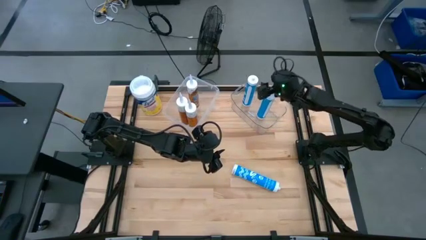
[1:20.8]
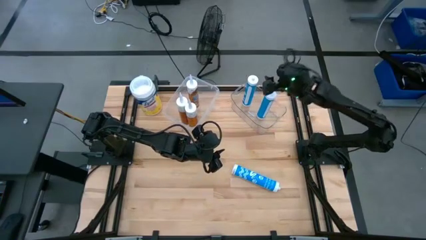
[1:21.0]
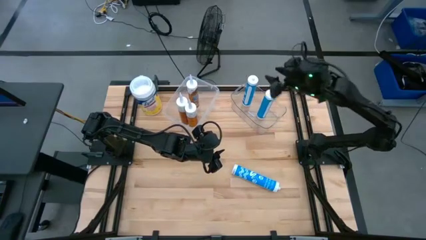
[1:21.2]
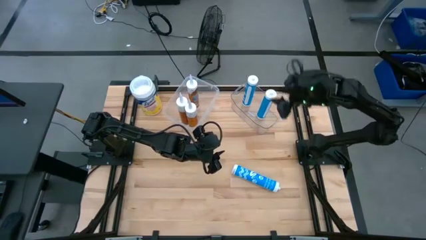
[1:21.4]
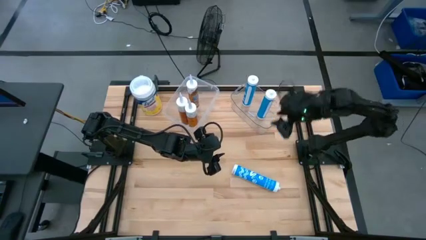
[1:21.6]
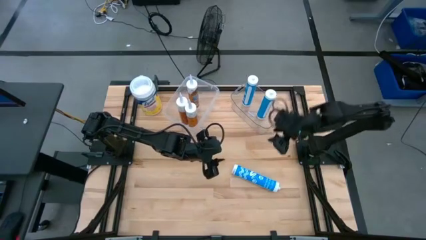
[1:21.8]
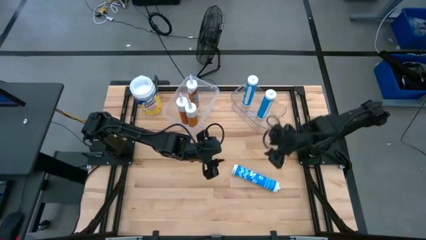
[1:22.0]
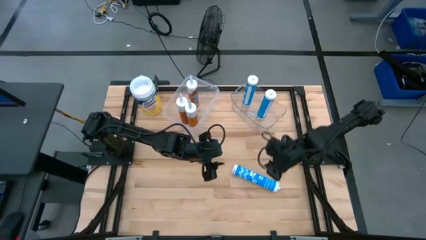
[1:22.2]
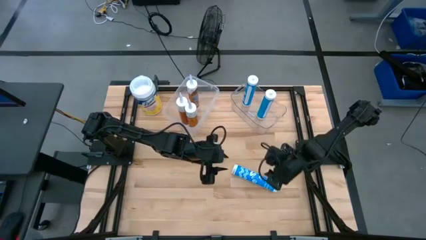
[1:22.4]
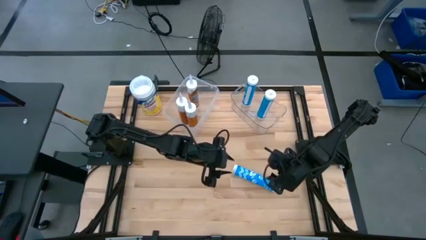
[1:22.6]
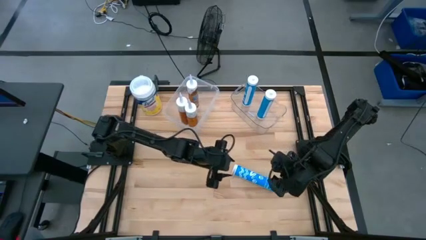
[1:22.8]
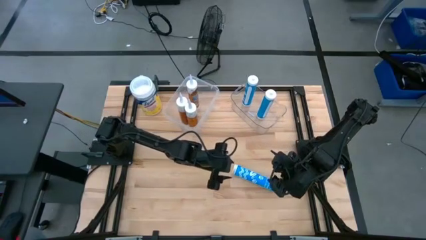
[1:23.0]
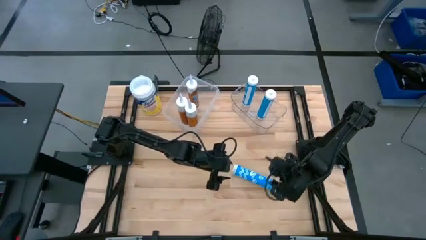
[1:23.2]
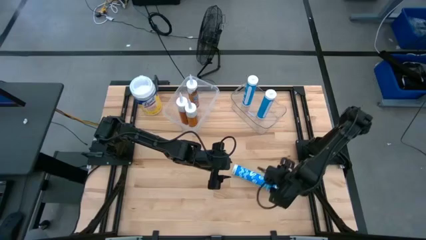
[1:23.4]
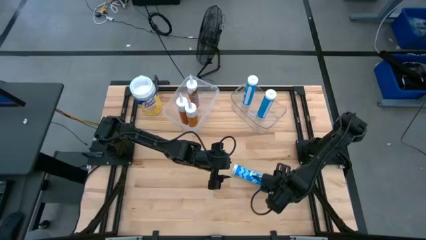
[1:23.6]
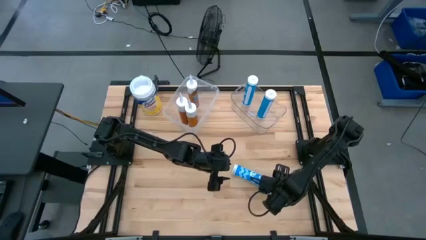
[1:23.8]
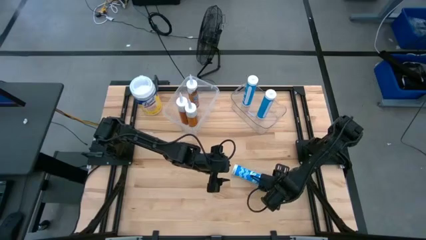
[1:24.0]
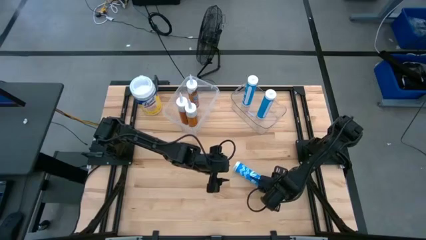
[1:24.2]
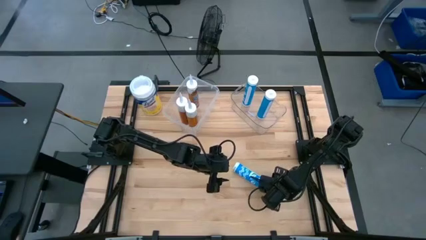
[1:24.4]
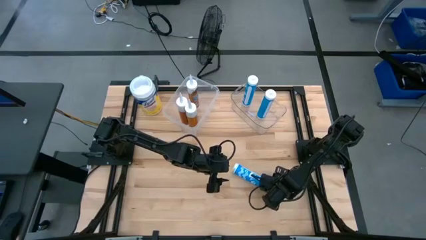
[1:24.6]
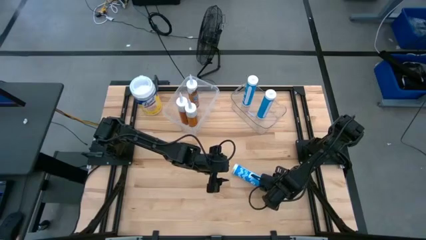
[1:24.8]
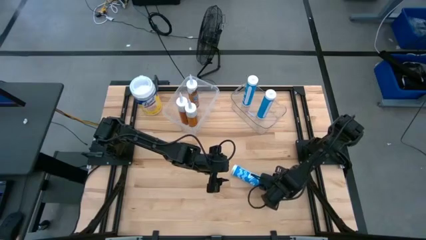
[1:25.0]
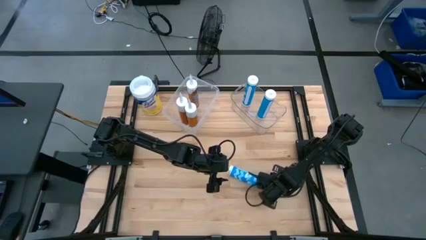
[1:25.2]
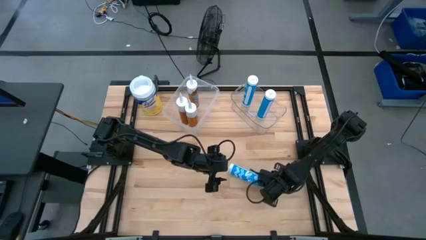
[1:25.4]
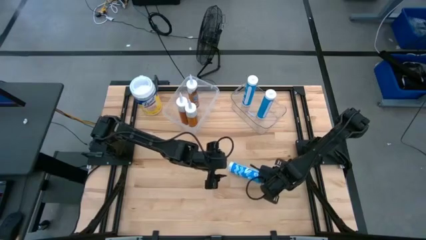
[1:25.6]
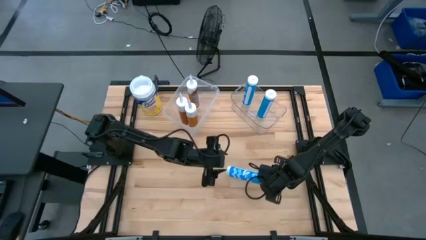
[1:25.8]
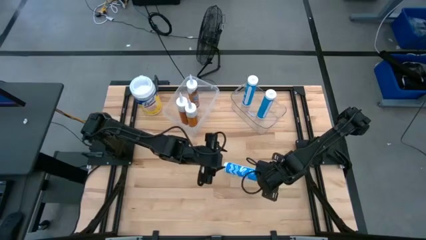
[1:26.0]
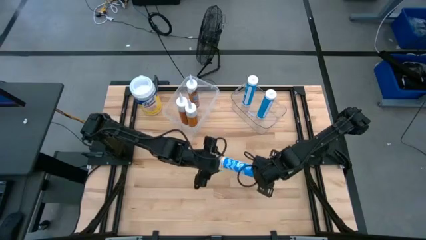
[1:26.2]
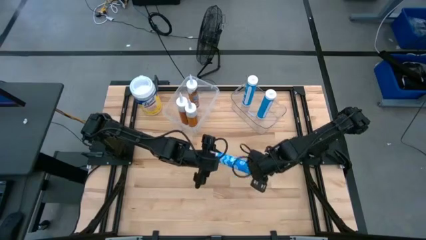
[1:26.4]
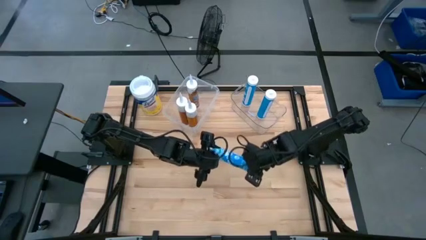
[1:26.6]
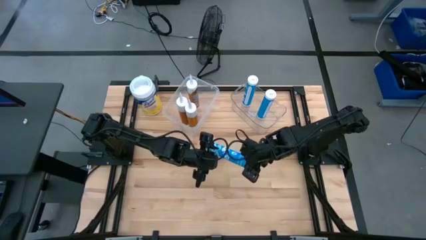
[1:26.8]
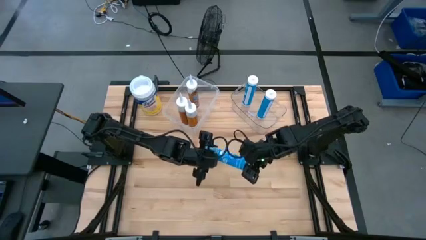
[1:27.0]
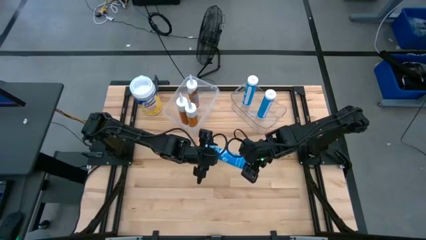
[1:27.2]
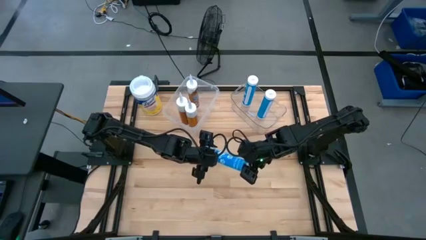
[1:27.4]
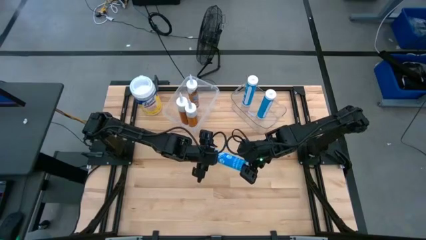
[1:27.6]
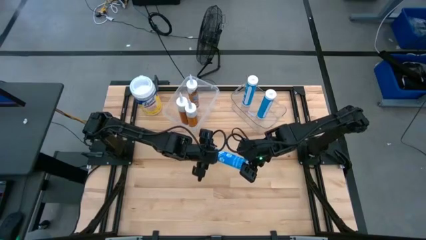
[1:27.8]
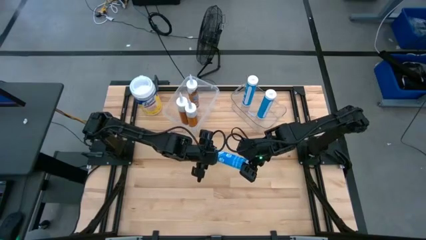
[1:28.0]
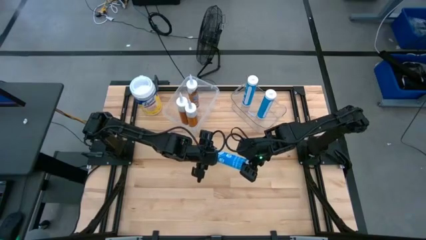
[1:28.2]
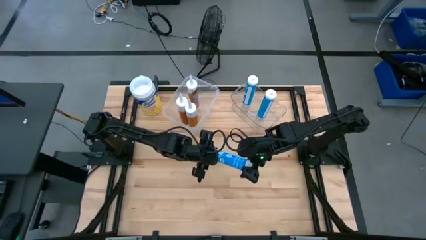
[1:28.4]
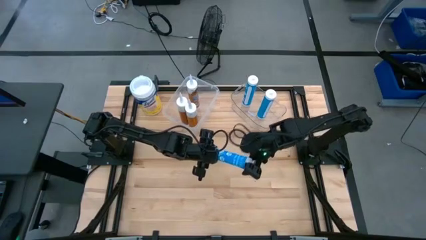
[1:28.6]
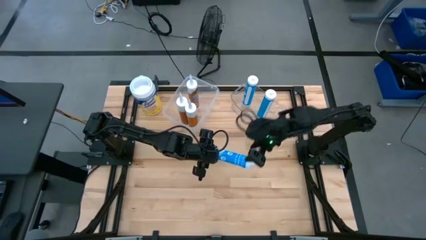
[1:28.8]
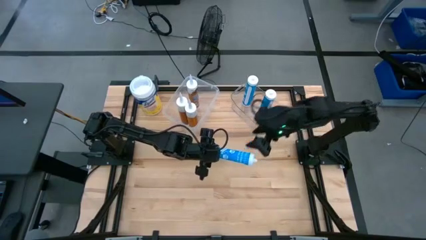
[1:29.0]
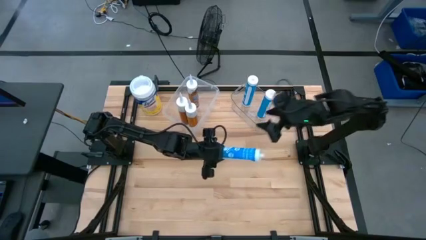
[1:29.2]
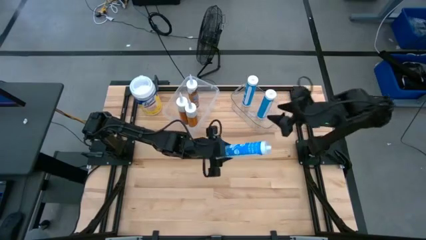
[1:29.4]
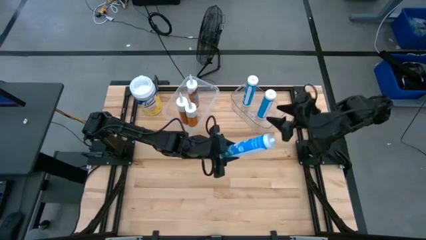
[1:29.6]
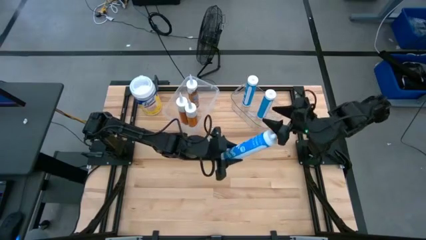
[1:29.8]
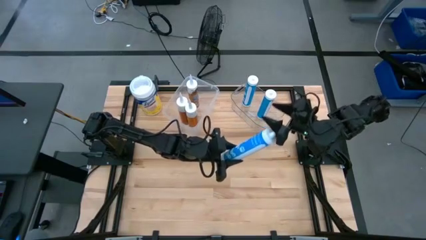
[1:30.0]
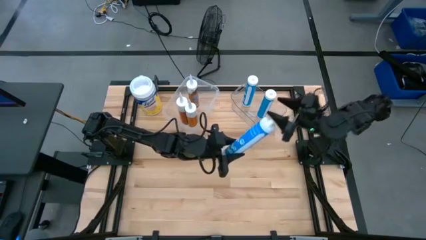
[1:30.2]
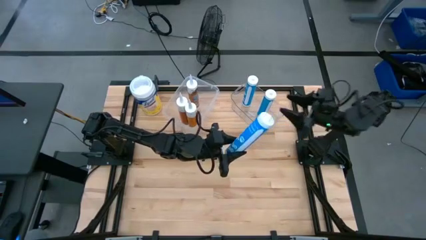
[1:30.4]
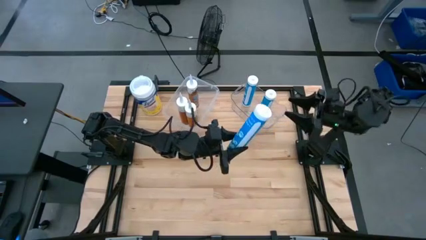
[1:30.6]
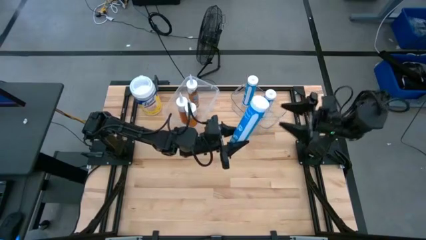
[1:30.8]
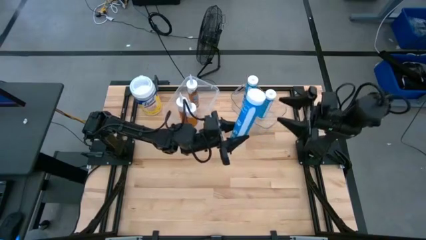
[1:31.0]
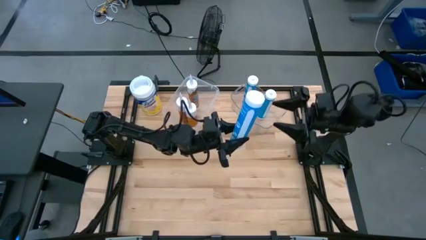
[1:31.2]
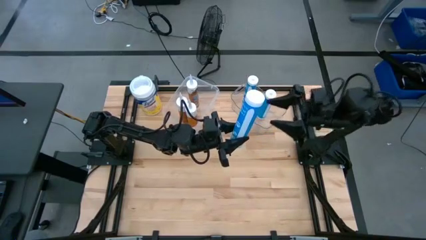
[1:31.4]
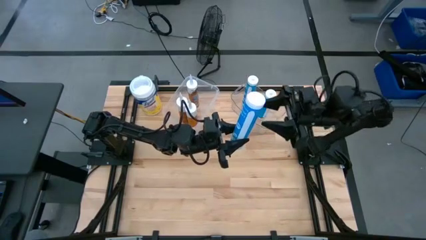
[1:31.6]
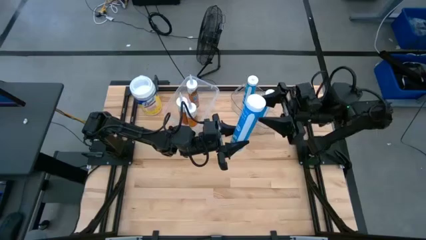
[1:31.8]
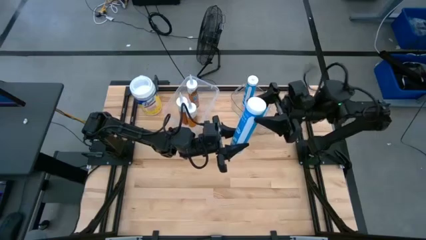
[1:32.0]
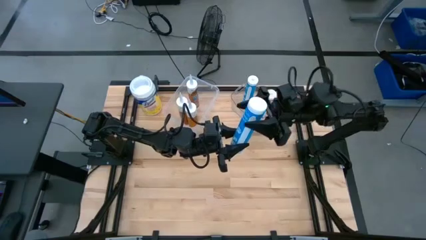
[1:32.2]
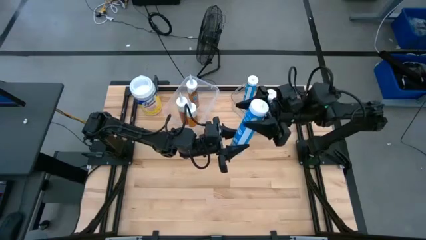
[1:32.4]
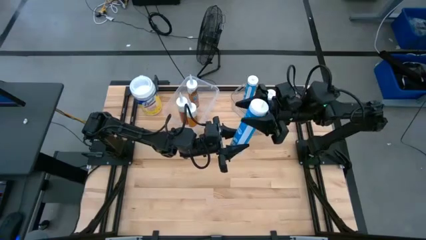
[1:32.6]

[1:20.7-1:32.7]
Task: Pick & place silicon tubes, Sealant and Lysol wipes
Put the blue sealant into the transparent bin
